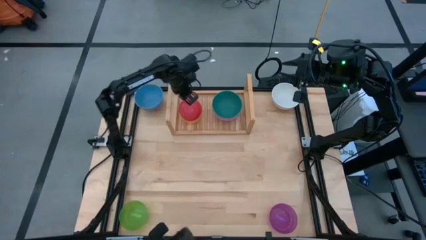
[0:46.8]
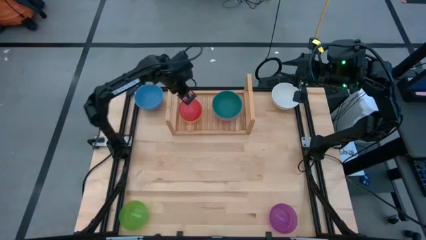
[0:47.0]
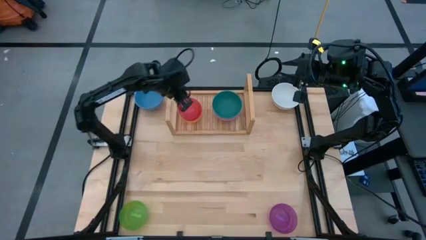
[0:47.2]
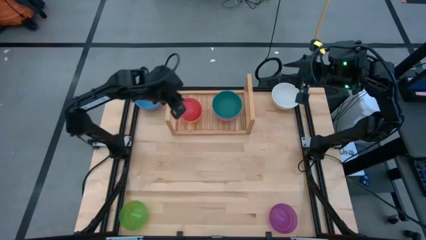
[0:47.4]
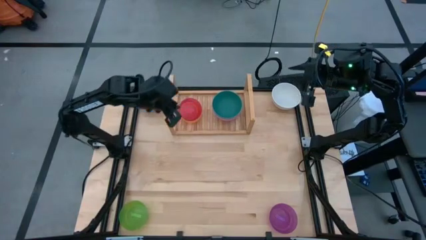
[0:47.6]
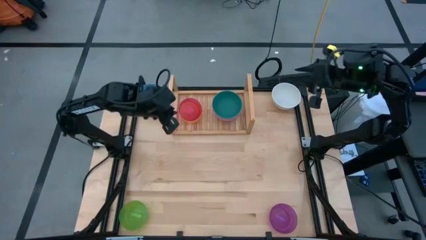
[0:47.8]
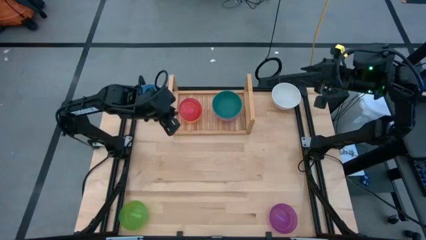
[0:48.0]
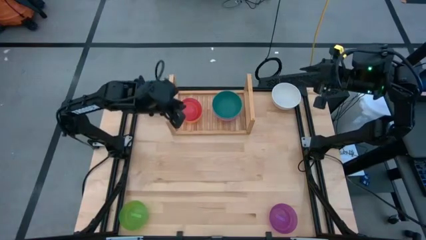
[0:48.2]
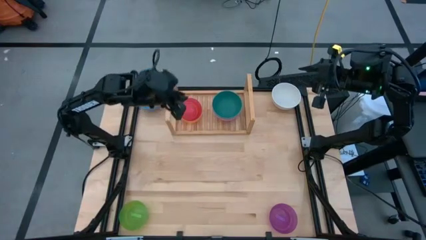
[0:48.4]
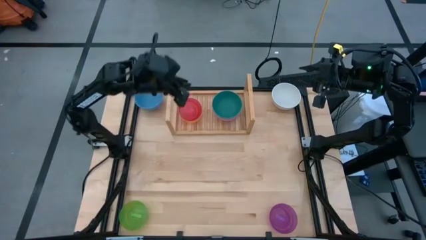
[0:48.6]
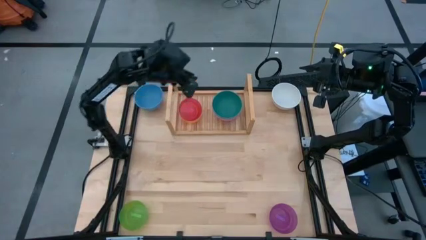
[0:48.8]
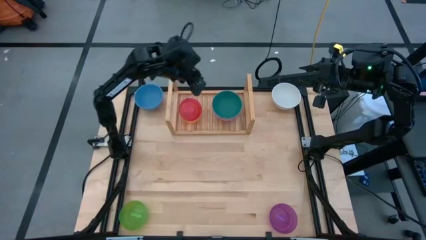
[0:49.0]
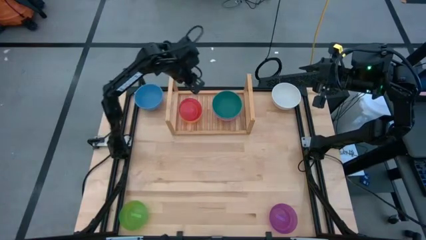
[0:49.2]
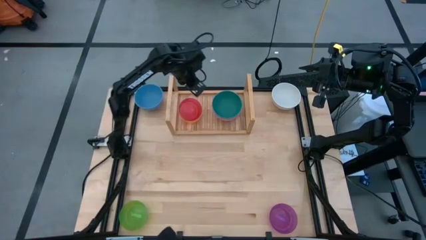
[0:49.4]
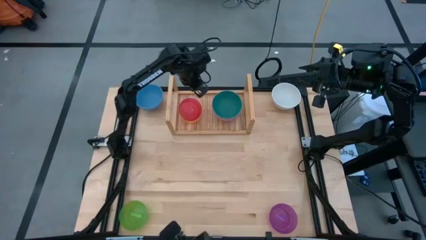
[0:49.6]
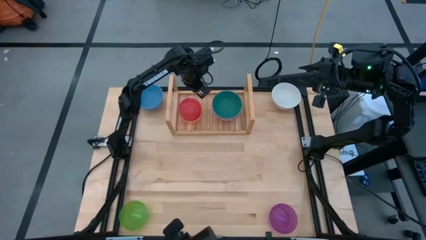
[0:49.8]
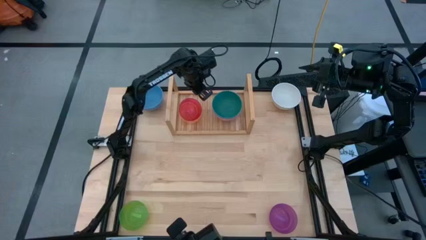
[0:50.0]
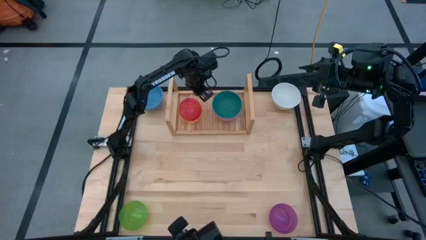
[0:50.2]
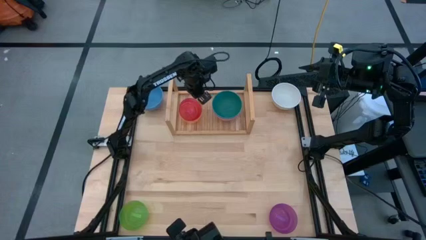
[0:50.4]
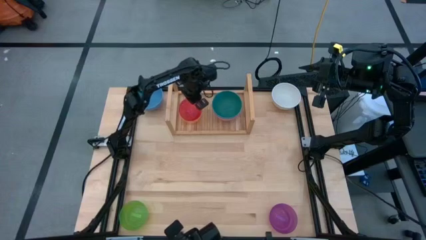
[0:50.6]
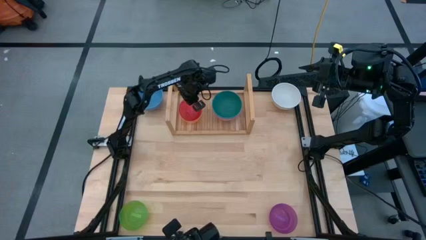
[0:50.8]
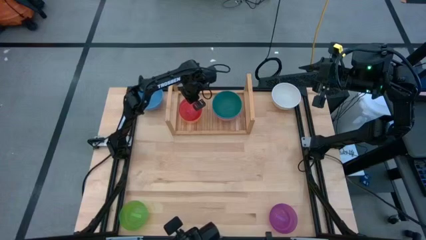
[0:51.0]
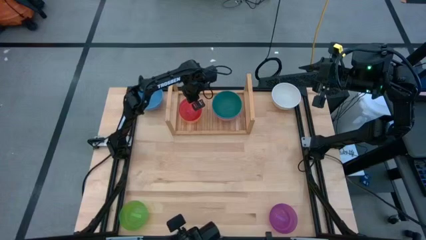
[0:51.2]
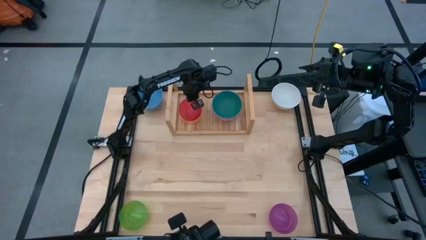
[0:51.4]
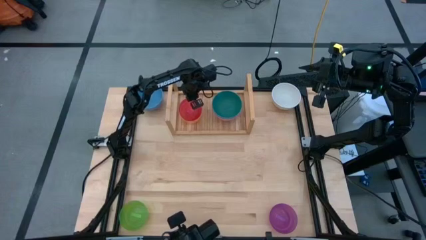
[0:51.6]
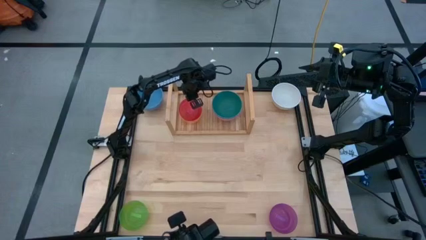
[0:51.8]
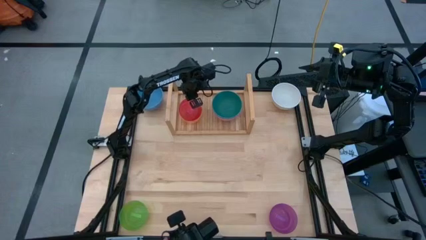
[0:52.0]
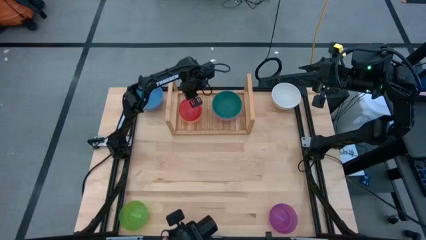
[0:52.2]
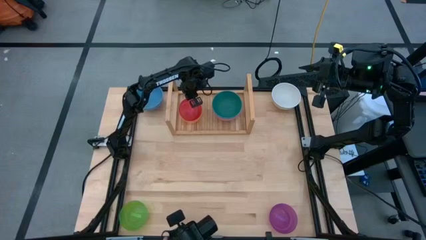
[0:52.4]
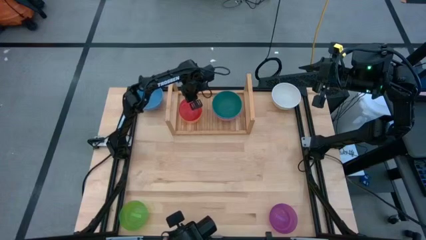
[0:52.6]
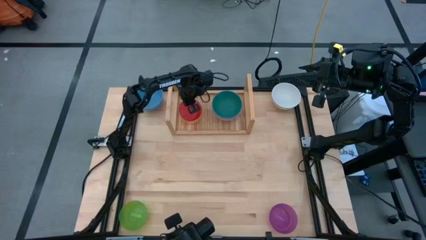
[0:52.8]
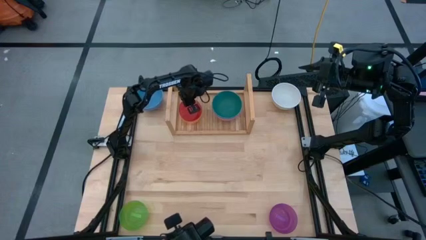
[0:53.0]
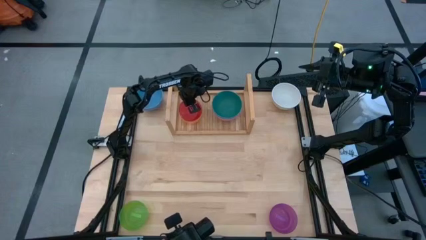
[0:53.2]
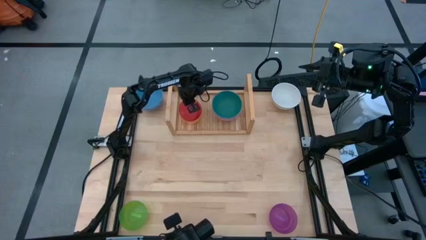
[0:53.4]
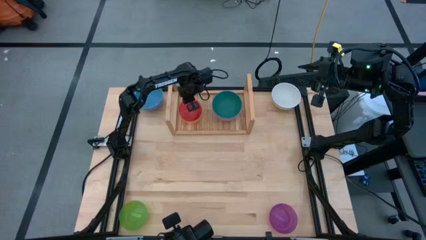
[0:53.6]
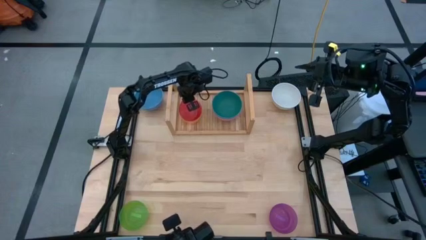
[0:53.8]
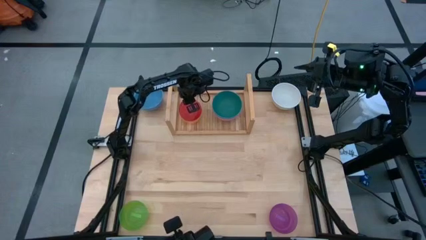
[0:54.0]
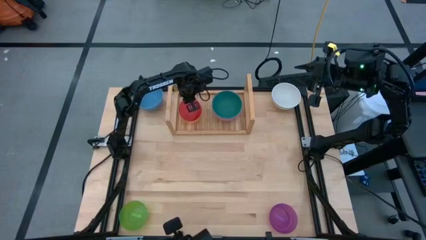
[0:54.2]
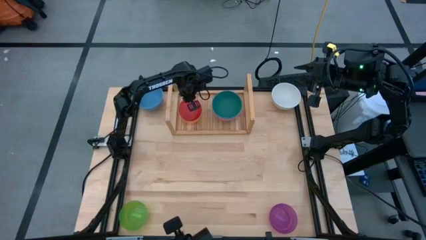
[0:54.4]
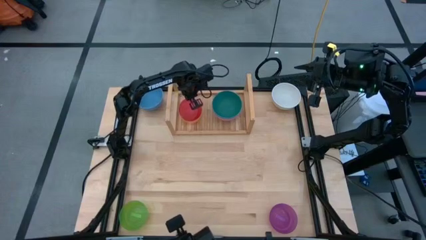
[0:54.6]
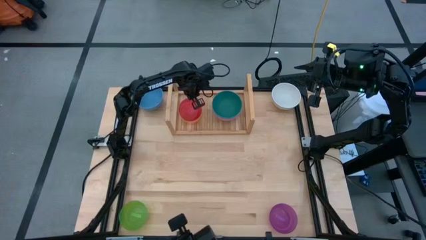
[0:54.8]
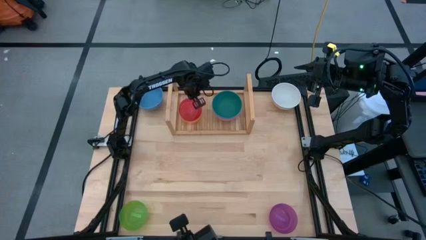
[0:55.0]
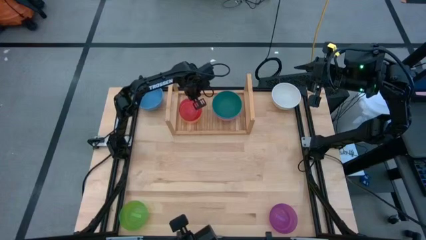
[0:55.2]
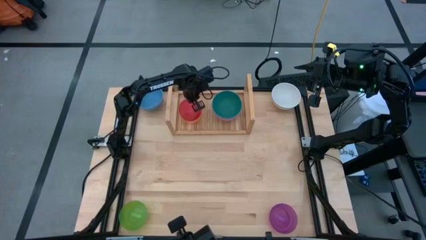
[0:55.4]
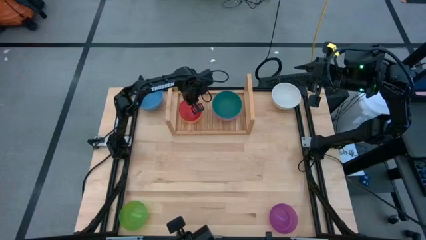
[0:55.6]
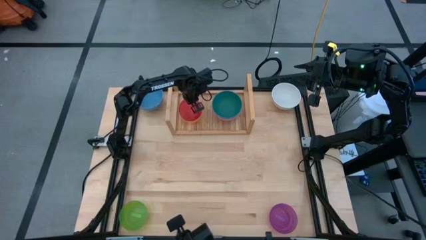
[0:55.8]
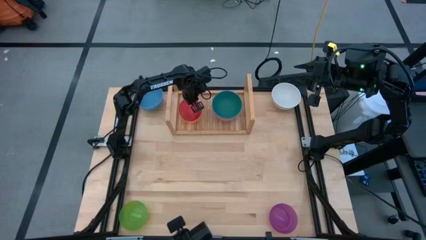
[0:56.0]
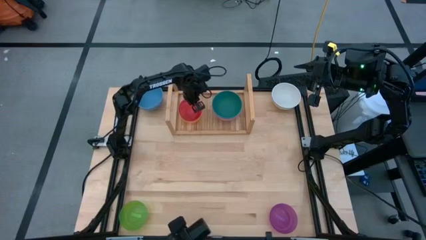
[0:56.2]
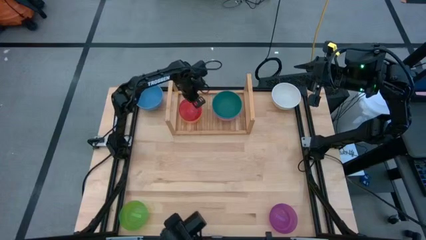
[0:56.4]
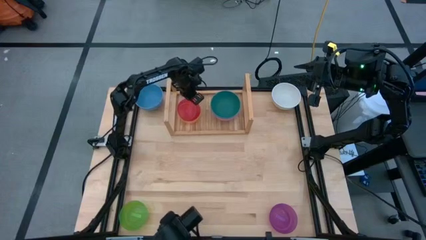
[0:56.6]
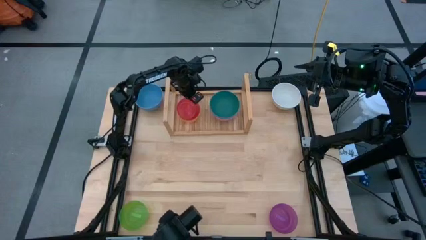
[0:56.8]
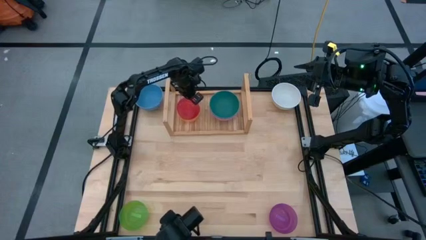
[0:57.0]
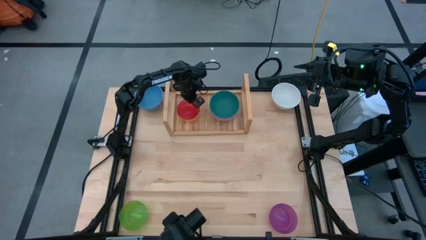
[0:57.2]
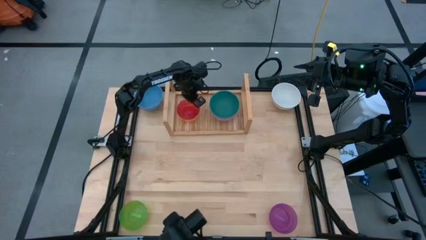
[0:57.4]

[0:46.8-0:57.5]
Task: Place and stack bowls onto a shelf
Stack the red bowl onto the yellow bowl
